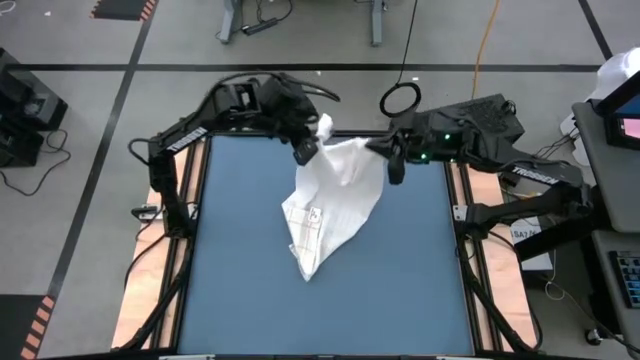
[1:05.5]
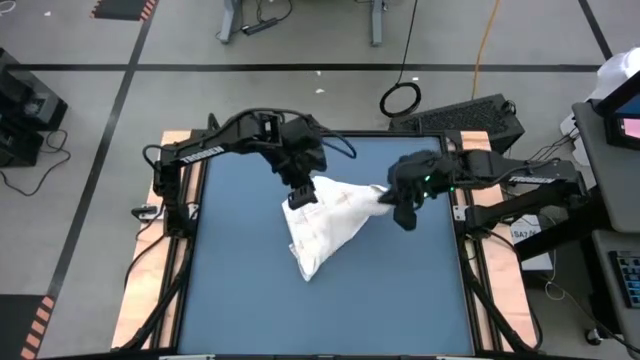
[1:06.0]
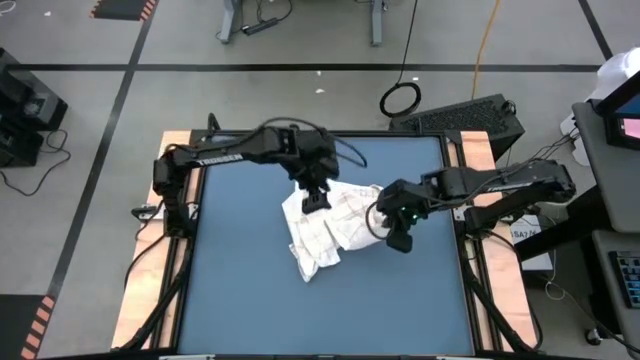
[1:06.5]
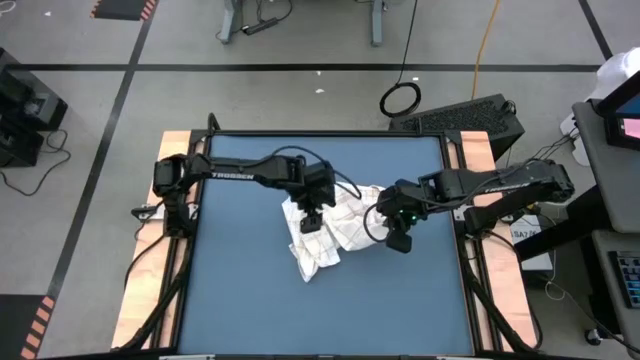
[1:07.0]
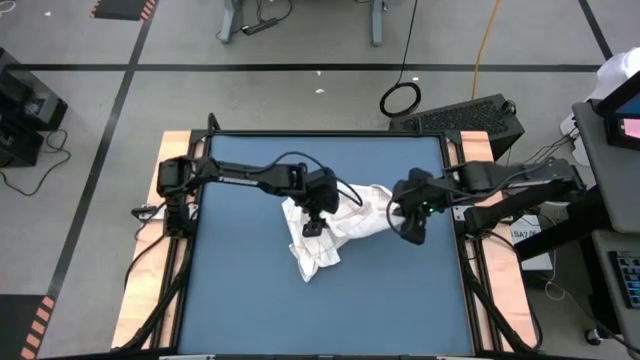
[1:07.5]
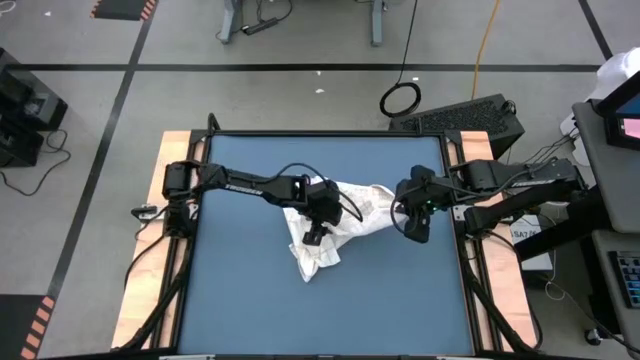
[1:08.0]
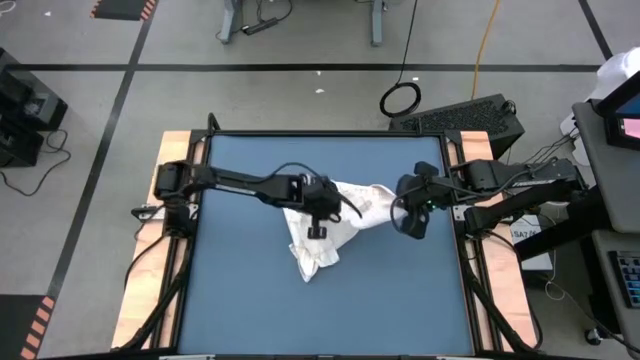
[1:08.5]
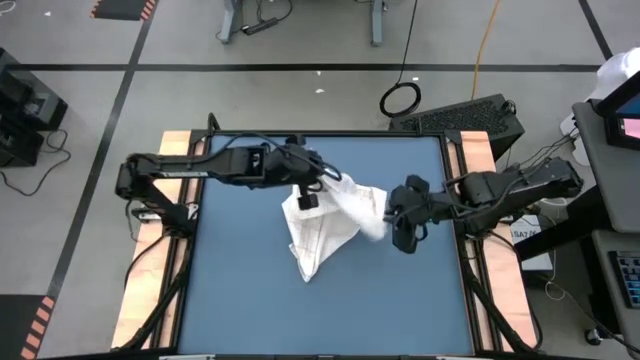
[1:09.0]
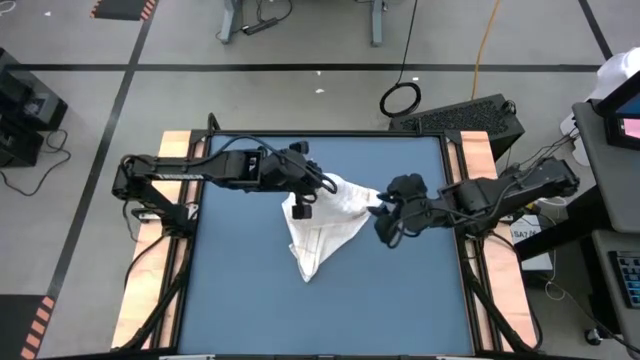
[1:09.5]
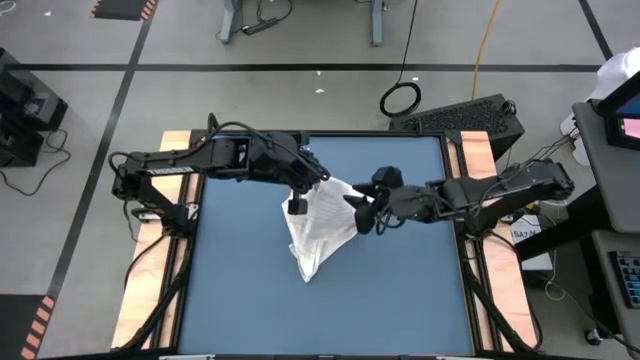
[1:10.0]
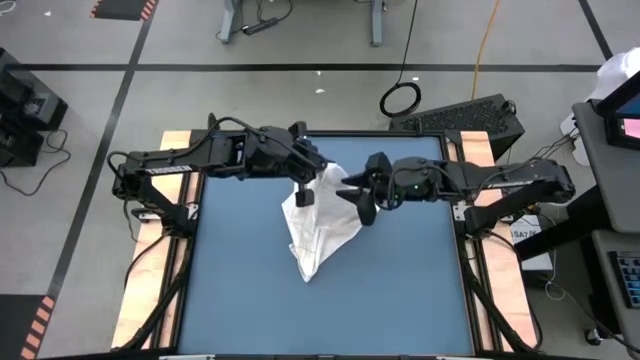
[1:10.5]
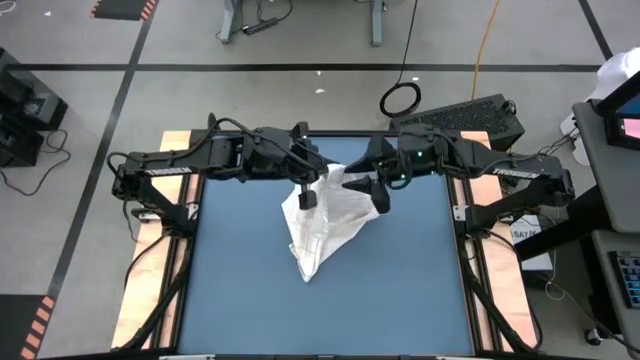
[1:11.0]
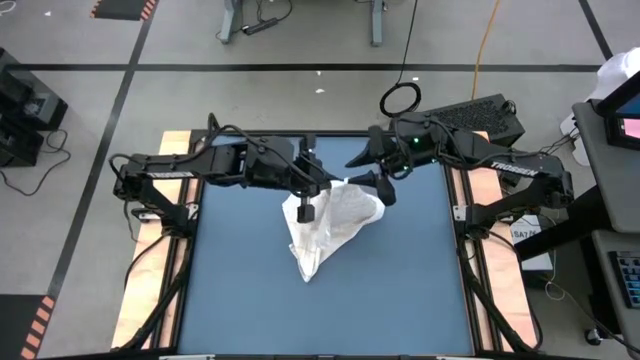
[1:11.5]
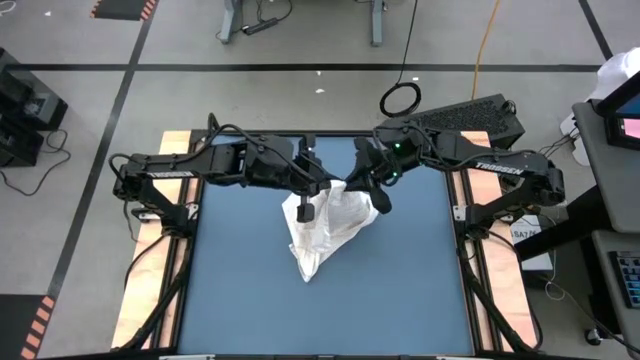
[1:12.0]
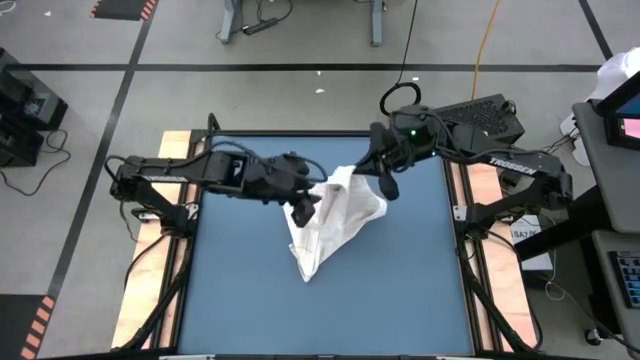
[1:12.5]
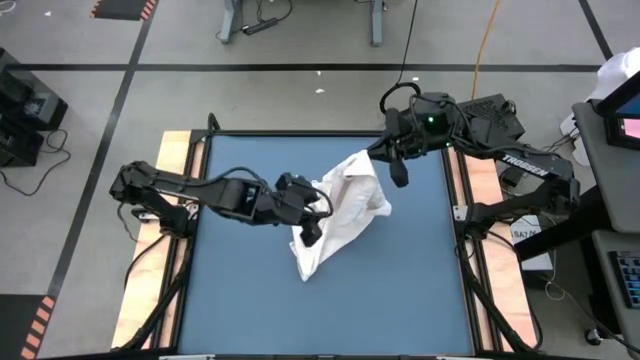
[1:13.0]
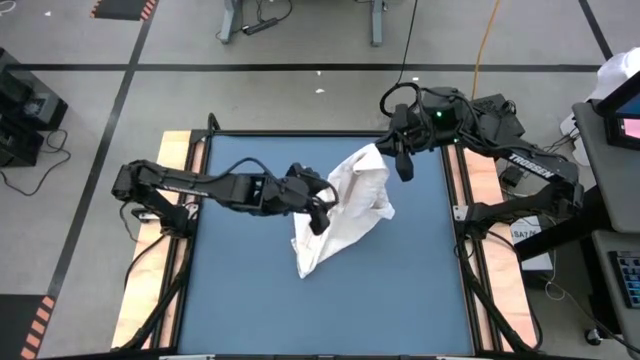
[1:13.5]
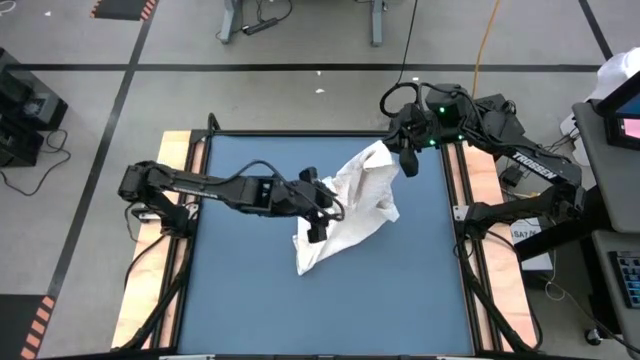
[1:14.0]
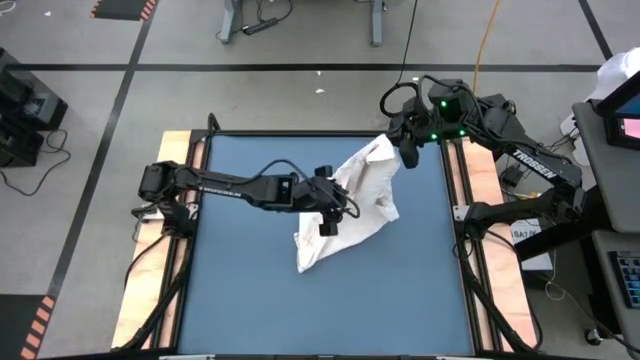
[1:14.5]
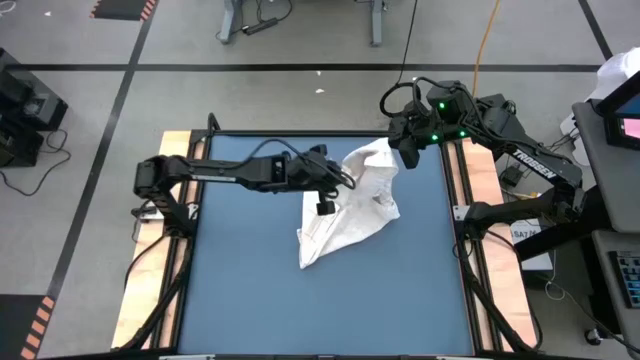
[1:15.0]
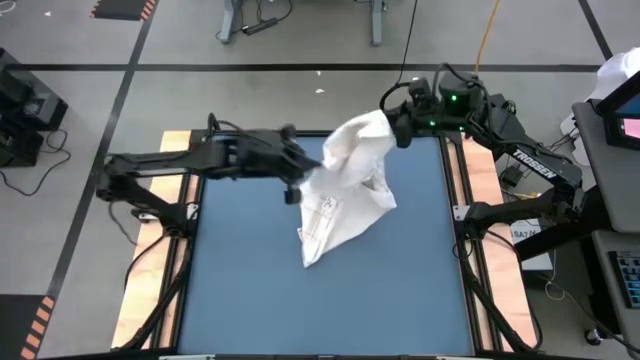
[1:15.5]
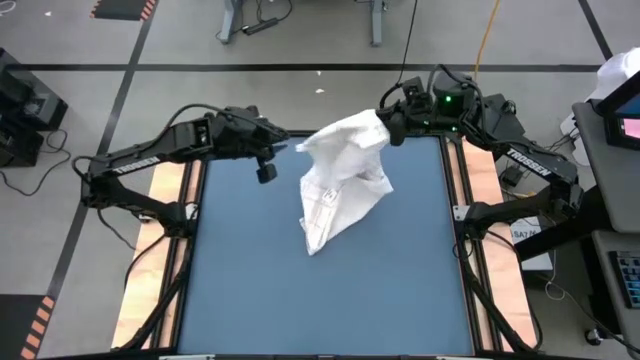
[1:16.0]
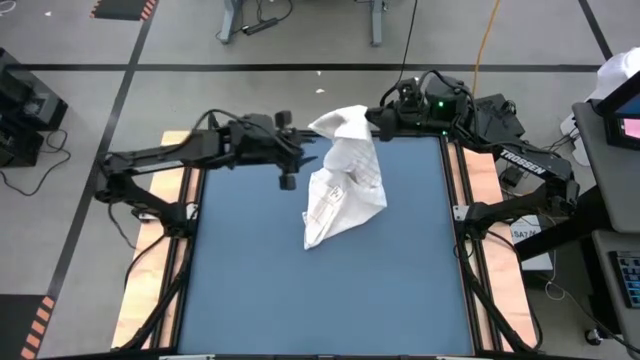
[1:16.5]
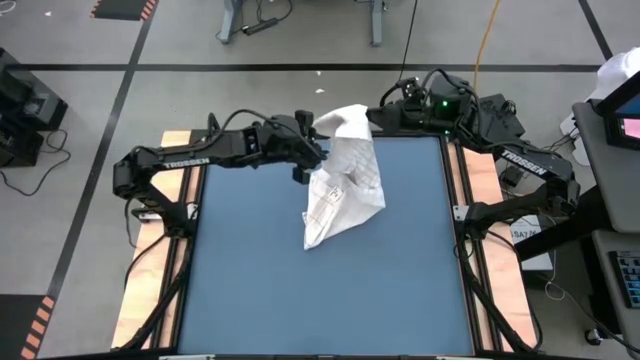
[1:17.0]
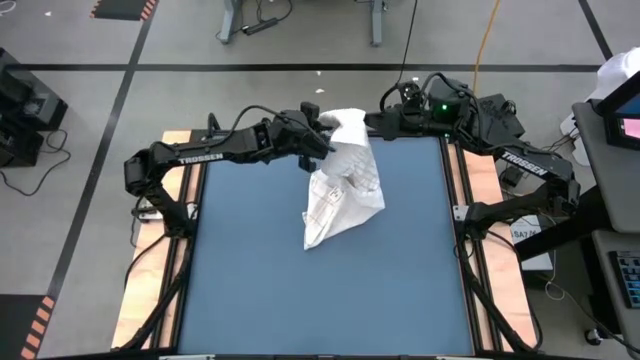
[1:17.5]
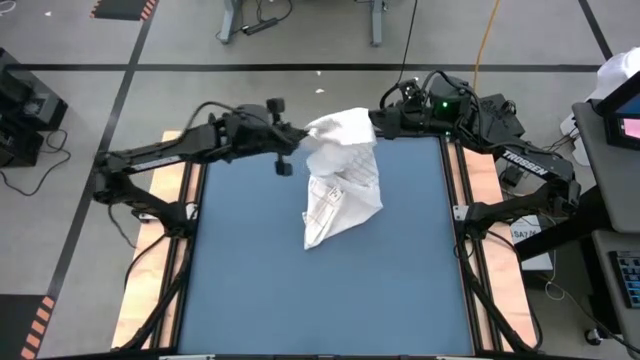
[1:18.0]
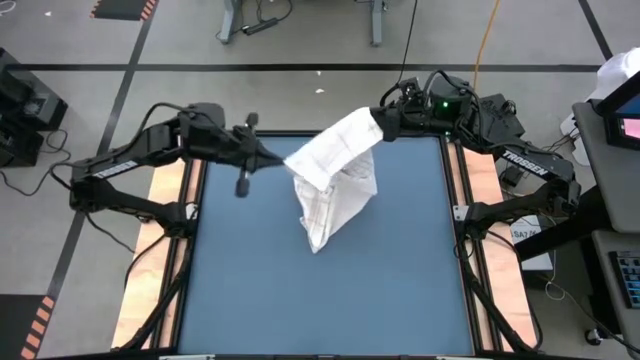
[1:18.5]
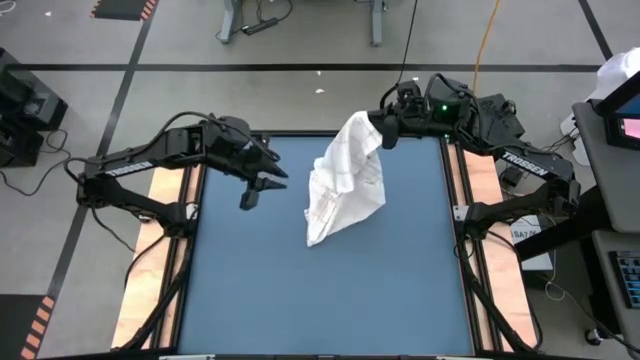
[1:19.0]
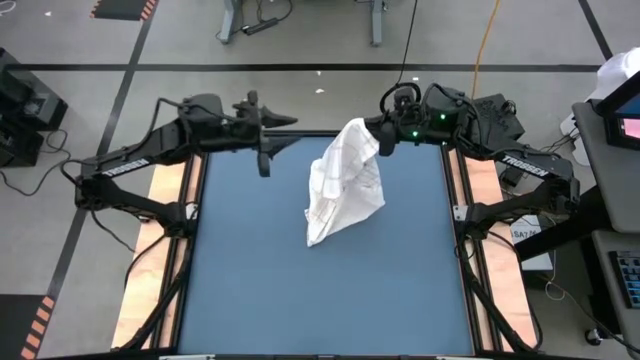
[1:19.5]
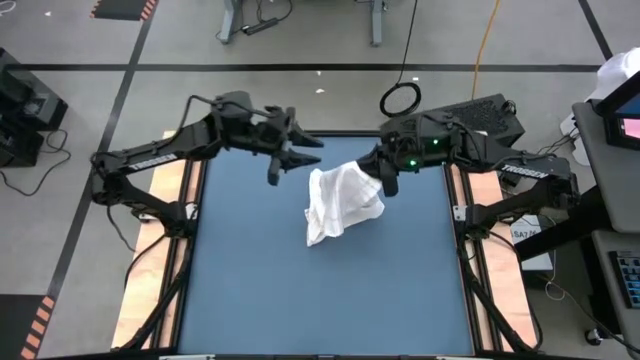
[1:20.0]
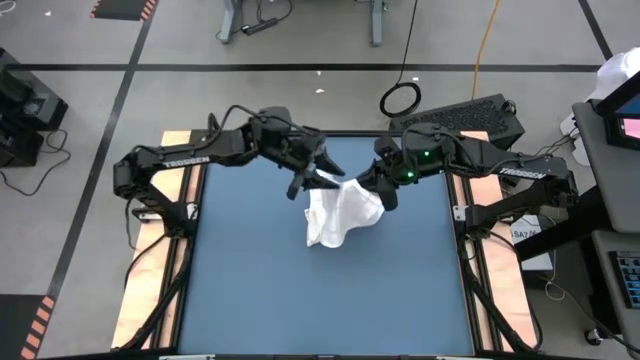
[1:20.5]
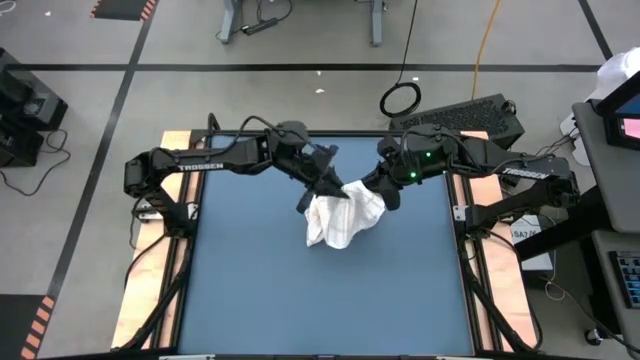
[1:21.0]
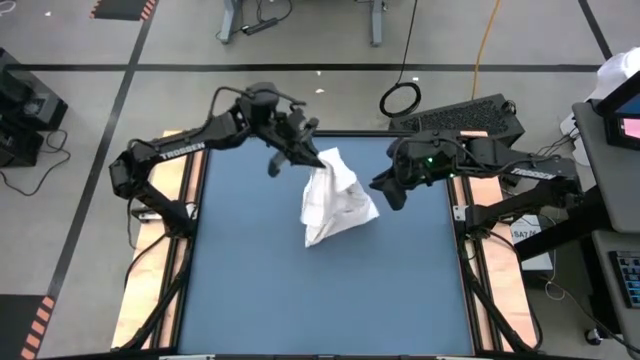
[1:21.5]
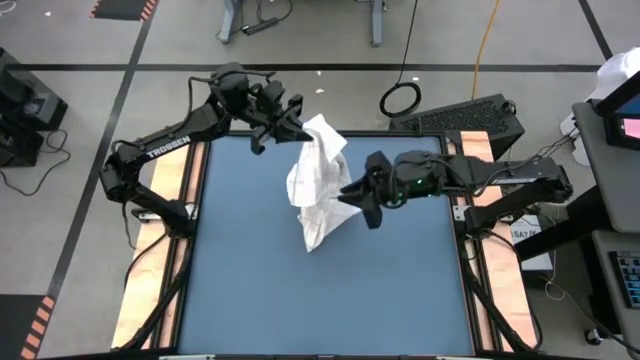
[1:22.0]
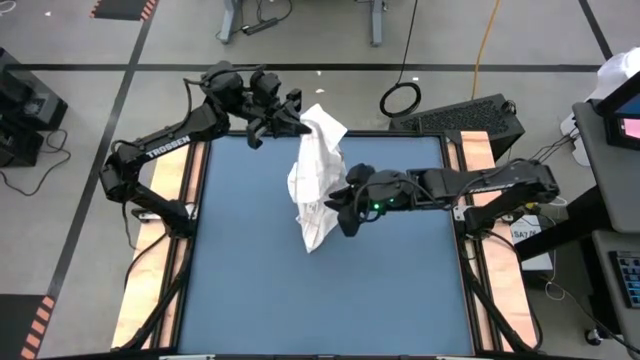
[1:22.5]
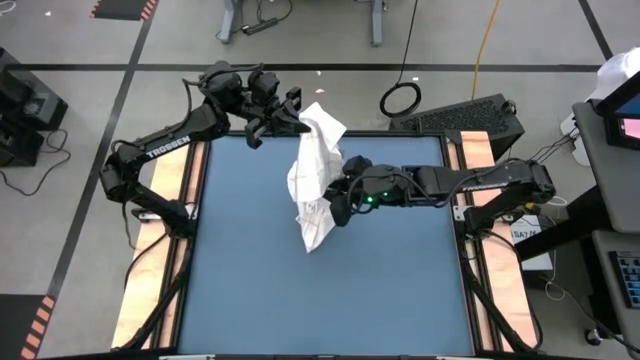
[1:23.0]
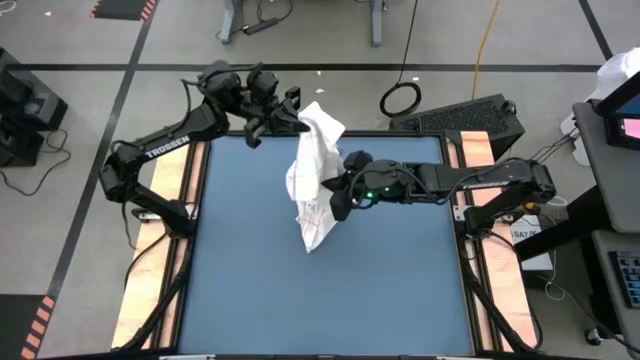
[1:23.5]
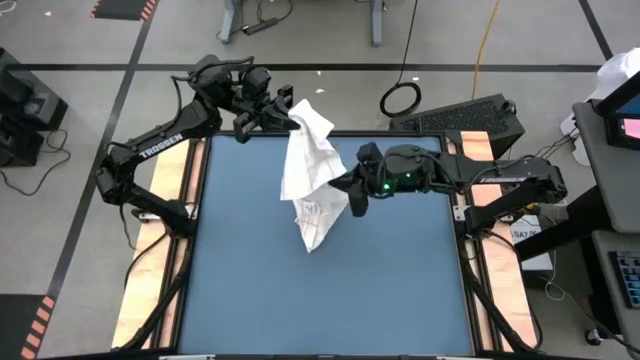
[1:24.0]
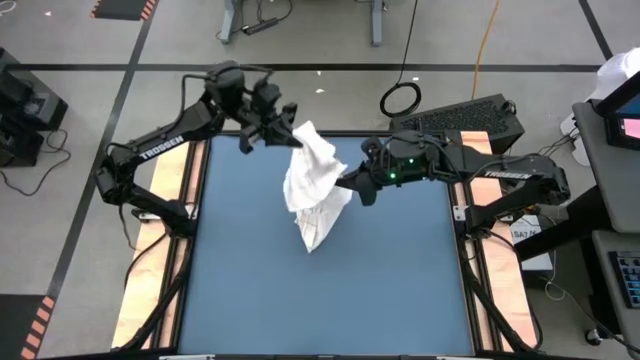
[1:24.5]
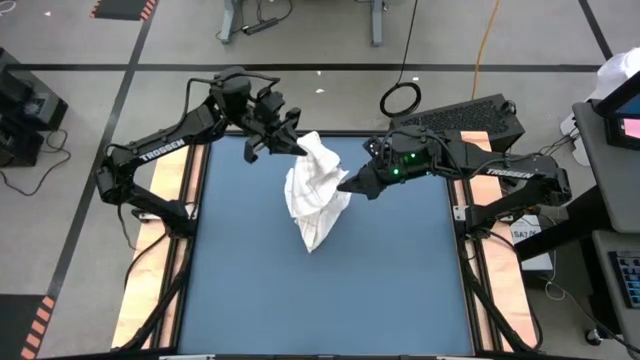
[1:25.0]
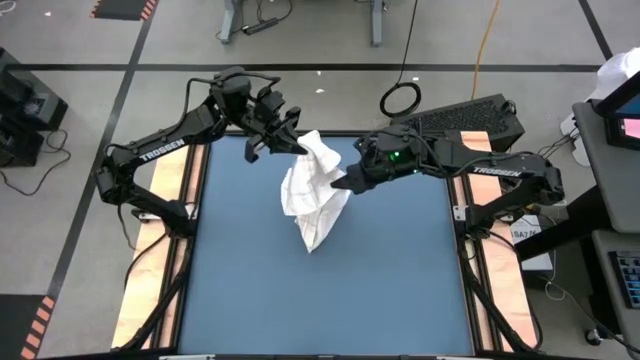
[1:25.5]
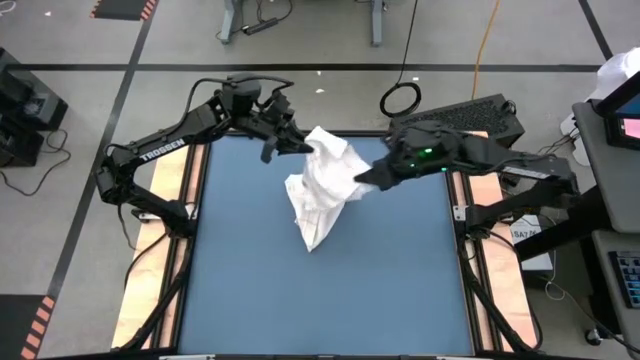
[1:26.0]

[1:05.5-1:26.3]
Task: Roll towel into tight, uniform cylinder
Roll the white towel

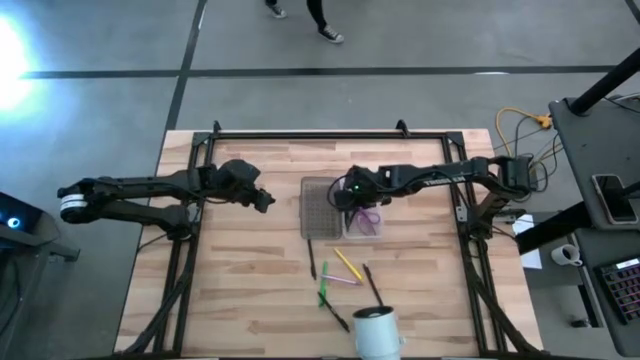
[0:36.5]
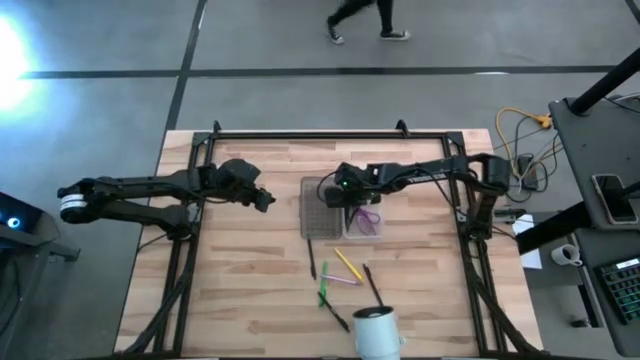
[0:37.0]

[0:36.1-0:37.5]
Task: Pick & place school supplies into a supply box
Adjust the gray supply box on the table
